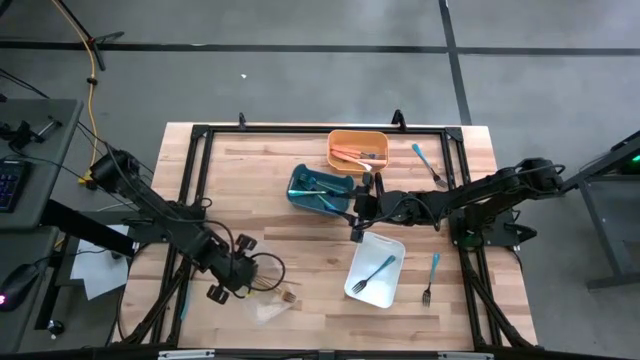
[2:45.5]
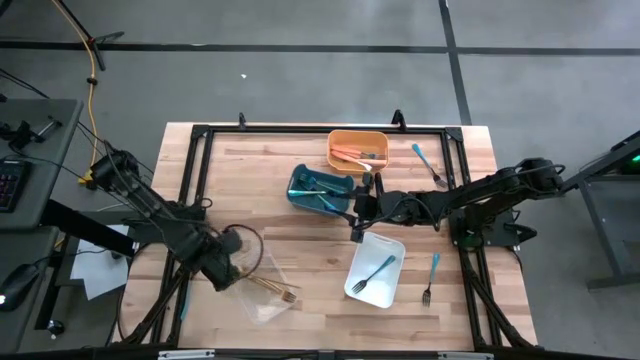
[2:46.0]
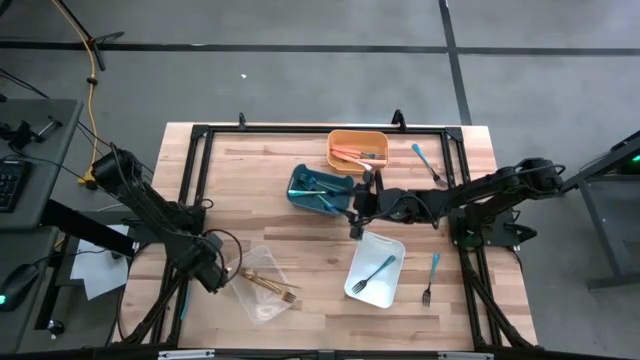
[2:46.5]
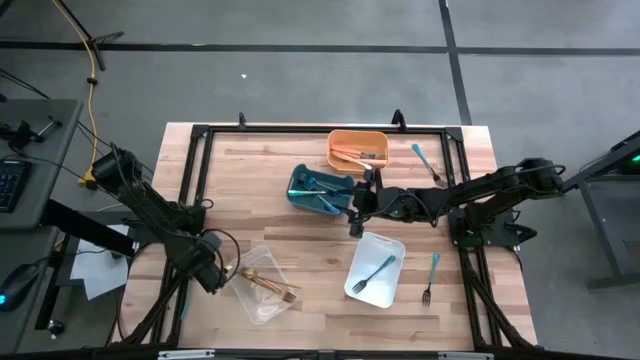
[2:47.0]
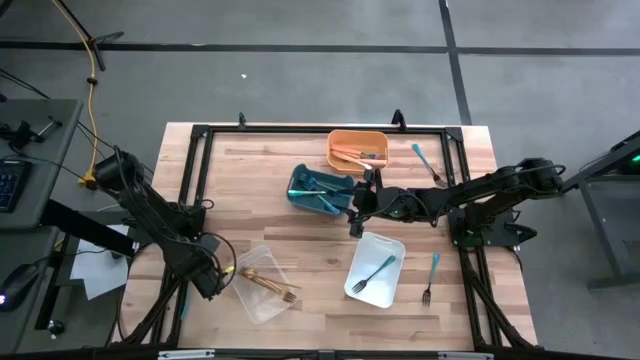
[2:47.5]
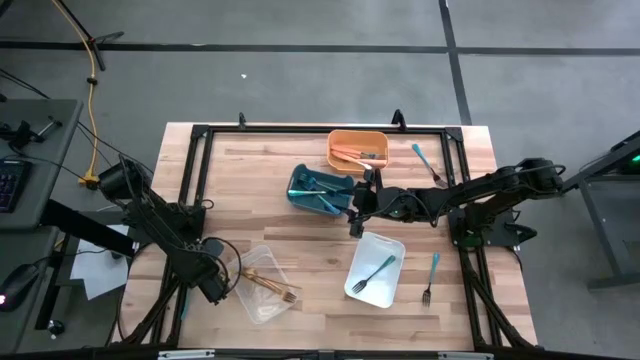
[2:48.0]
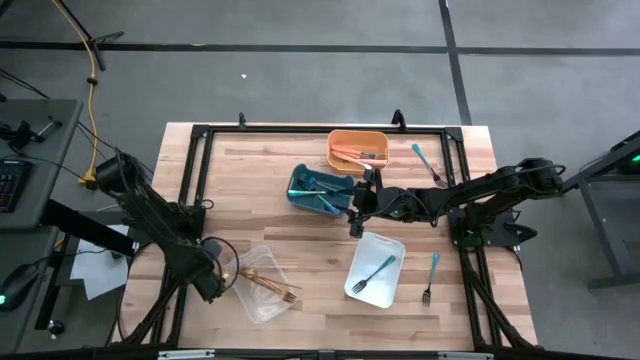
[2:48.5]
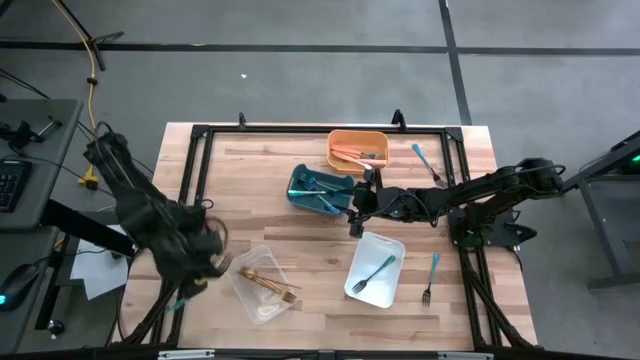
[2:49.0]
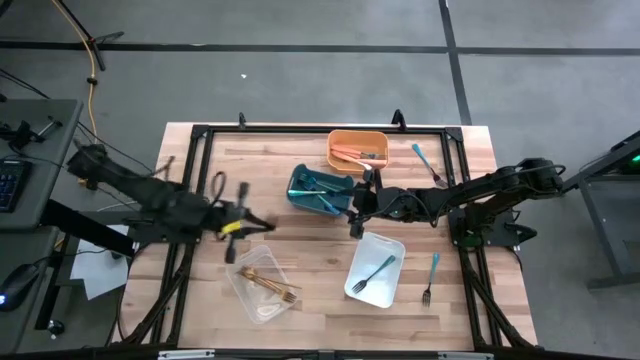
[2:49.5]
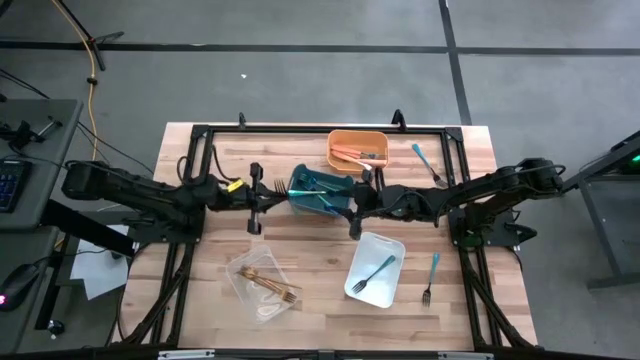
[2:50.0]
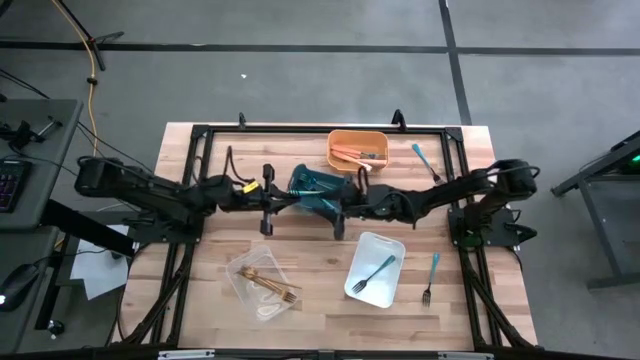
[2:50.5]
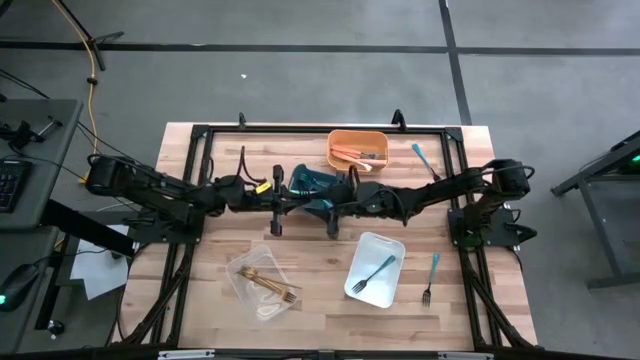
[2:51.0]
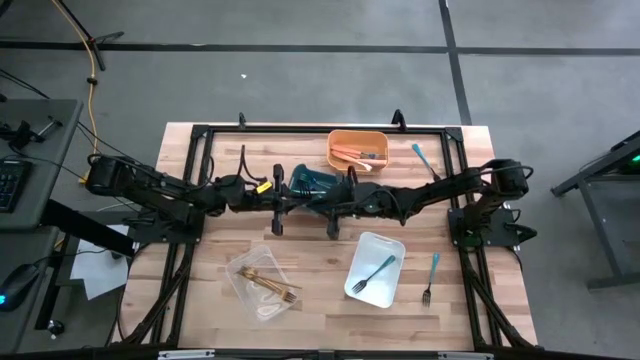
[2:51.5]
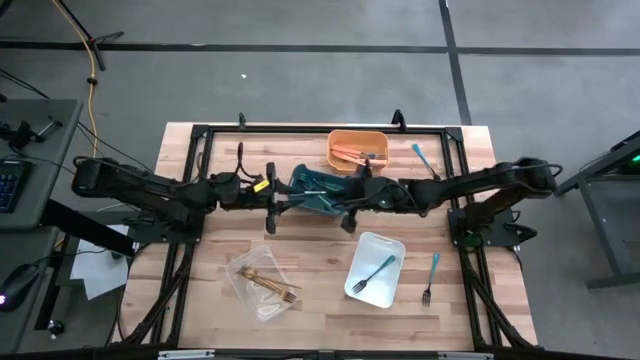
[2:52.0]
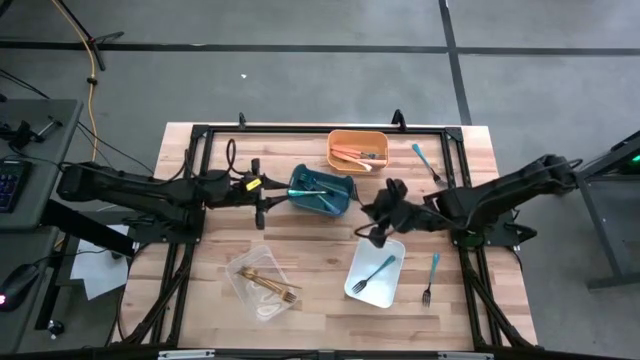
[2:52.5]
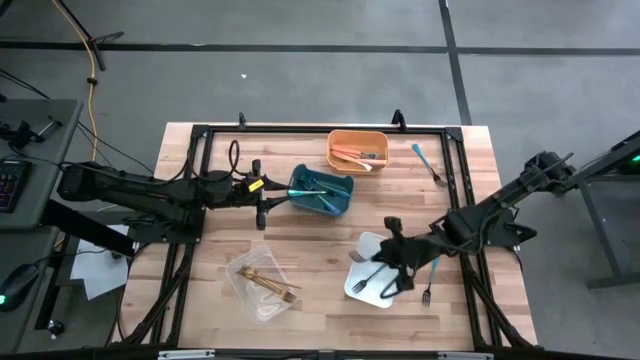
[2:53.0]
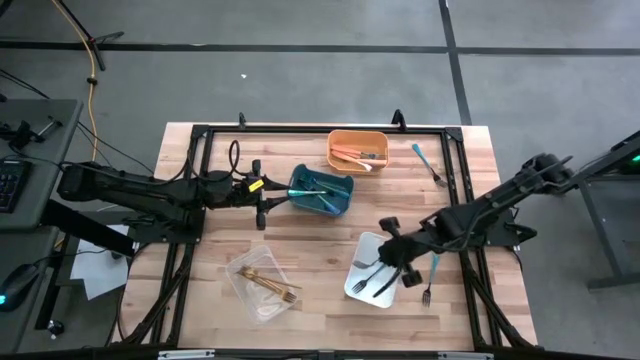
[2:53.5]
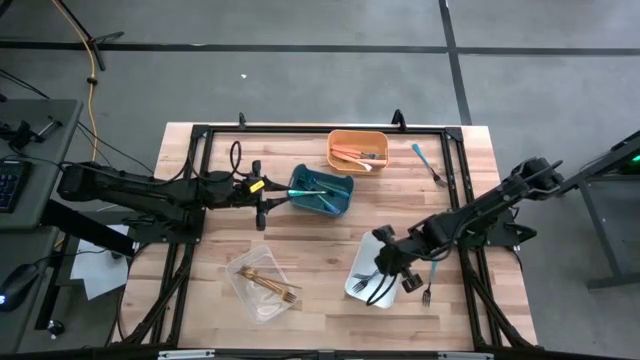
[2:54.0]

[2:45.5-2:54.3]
Task: Sort silverware by color (type)
Put the blue-black fork into the white bin

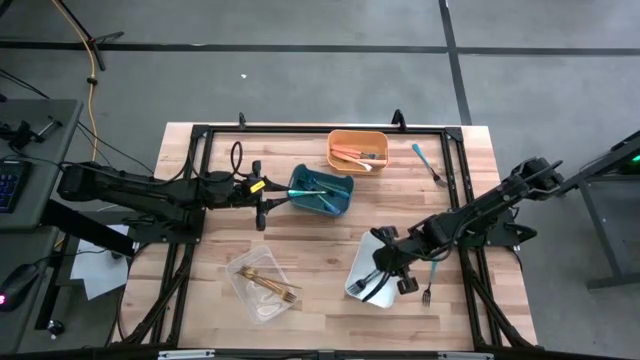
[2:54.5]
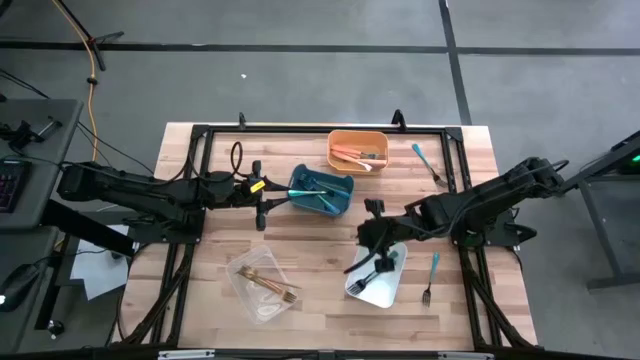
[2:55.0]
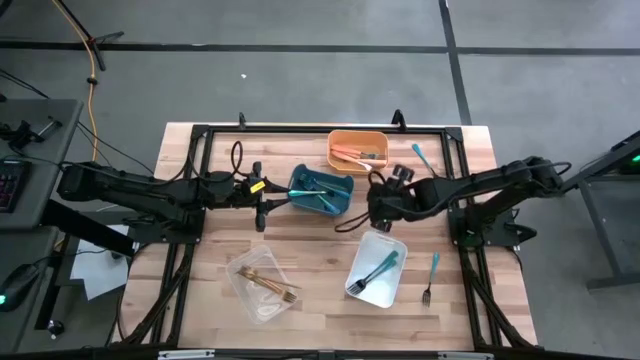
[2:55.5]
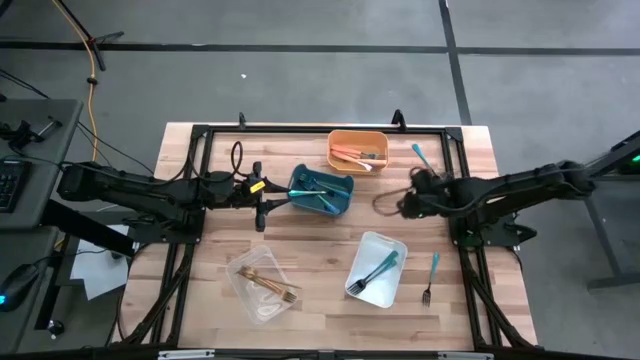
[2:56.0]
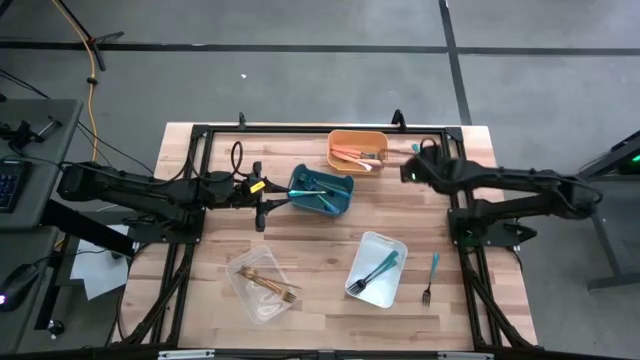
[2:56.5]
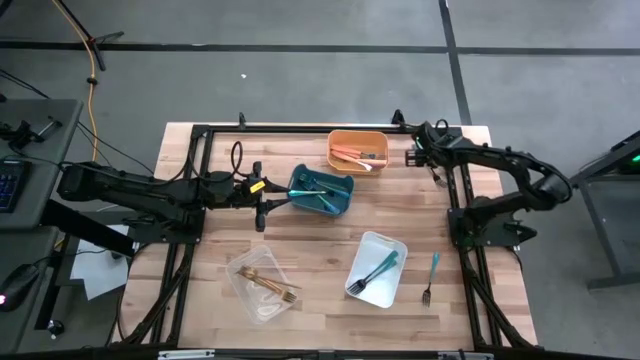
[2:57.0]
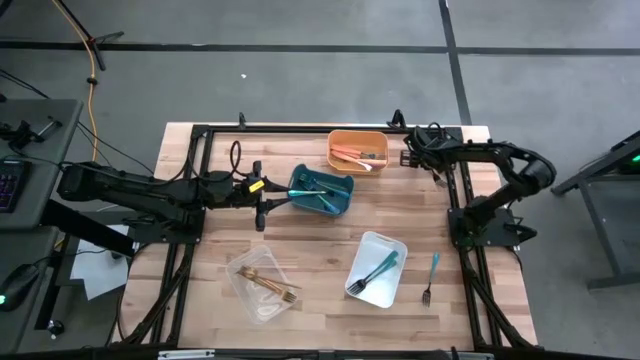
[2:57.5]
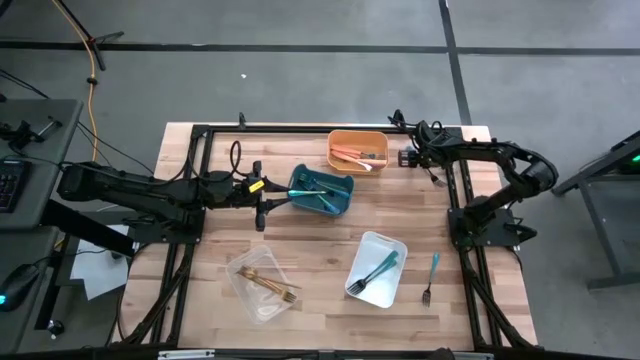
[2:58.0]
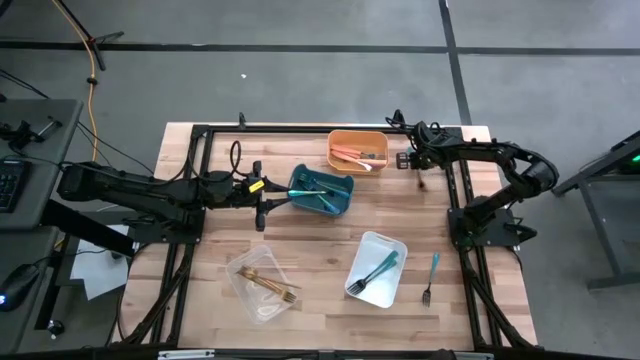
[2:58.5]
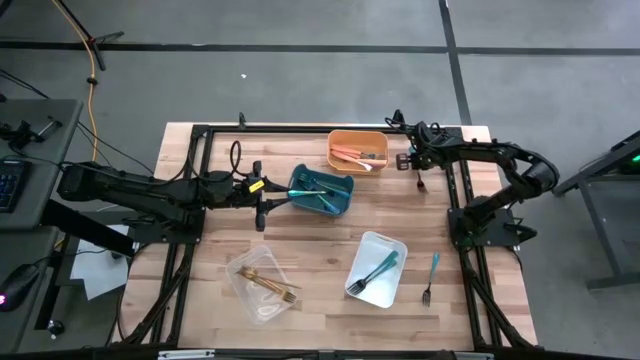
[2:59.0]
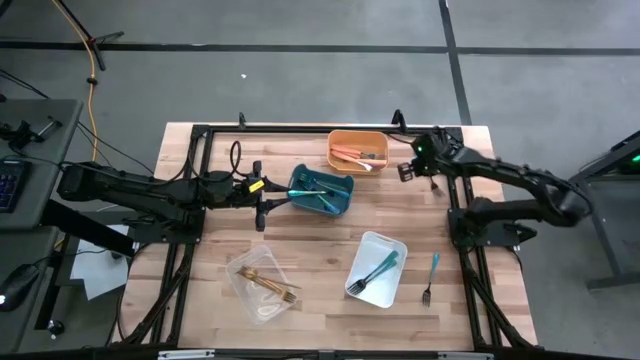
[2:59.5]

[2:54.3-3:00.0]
Put the blue-black fork into the white bin

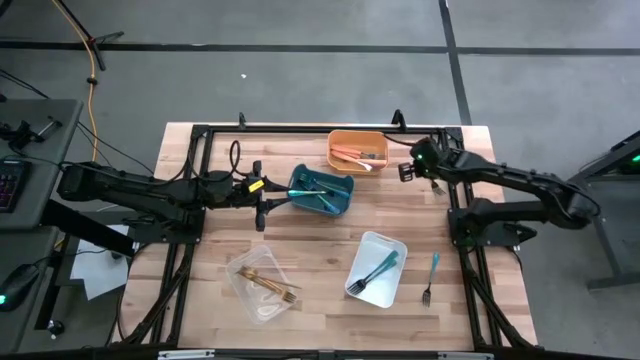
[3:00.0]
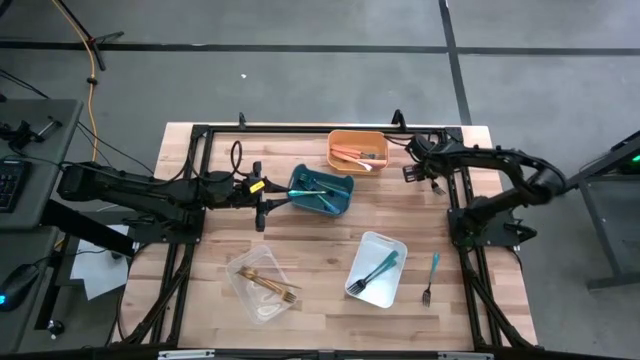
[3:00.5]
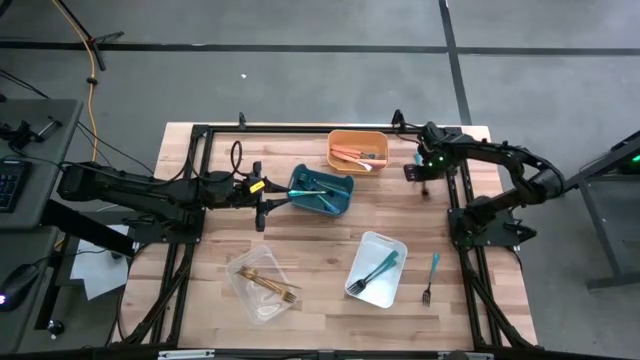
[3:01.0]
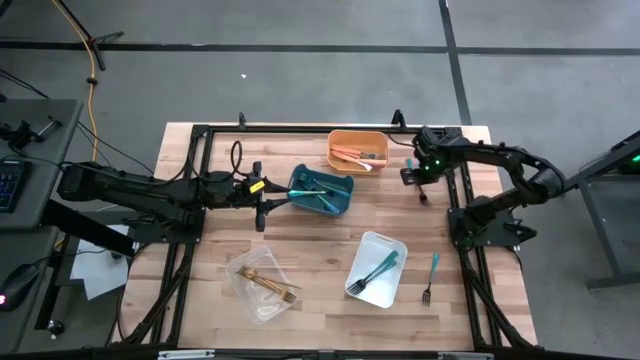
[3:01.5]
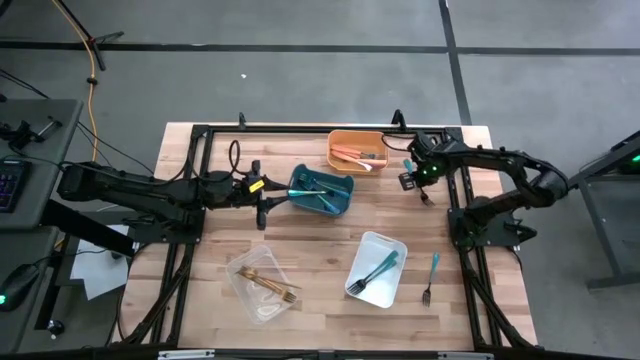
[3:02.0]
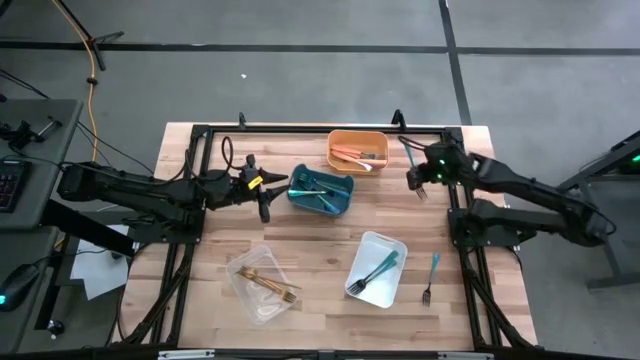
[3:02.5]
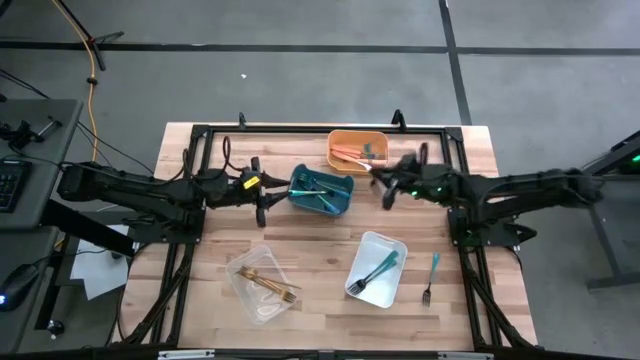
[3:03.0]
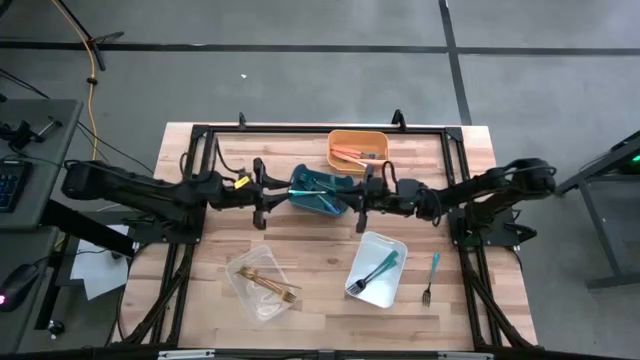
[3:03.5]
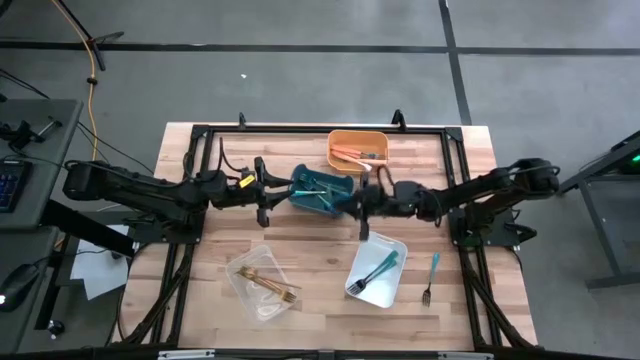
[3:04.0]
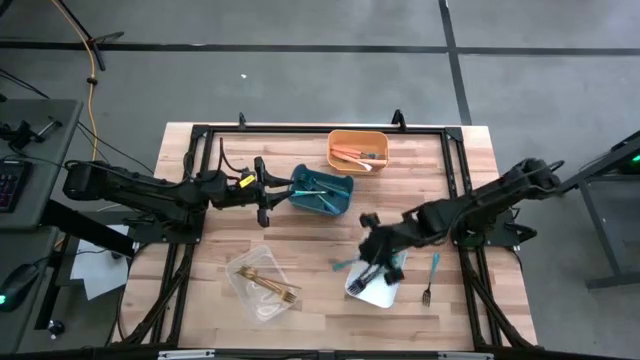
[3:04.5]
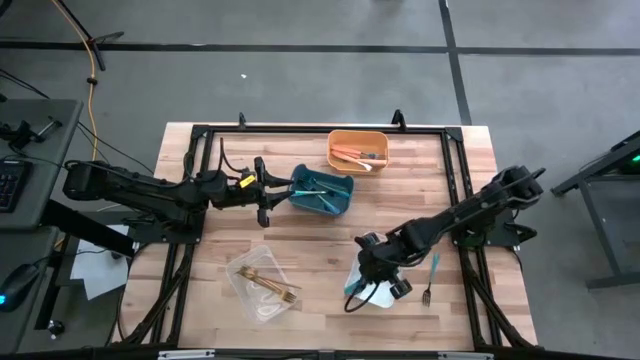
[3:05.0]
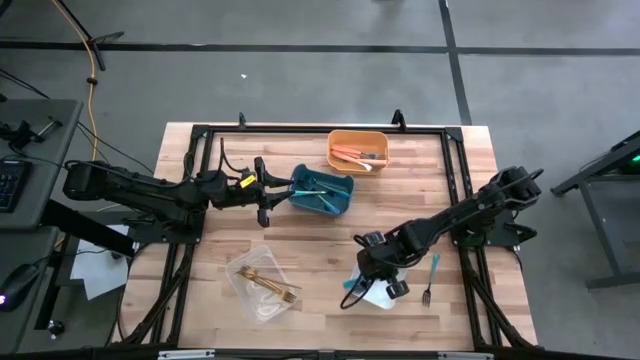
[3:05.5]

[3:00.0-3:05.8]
Put the blue-black fork into the white bin

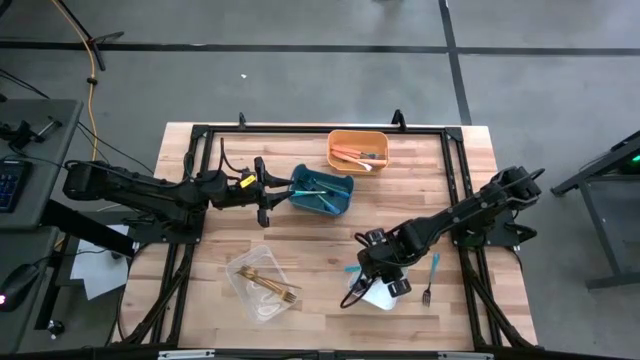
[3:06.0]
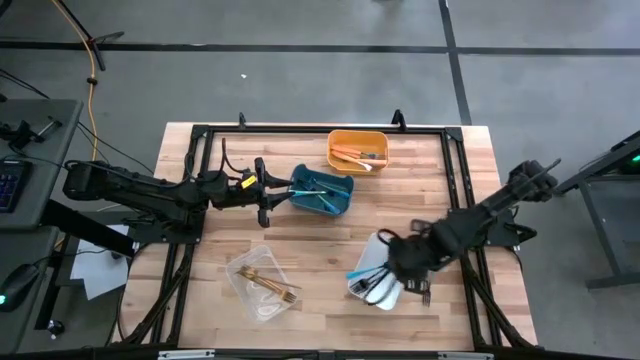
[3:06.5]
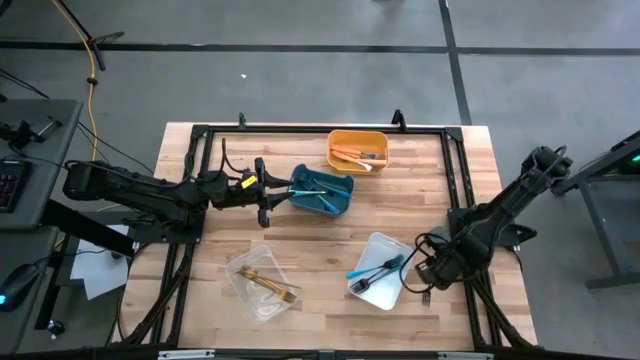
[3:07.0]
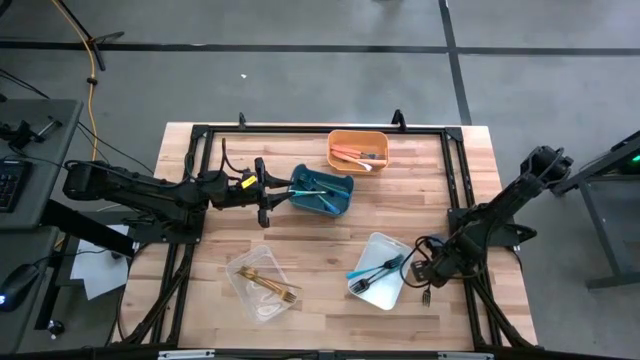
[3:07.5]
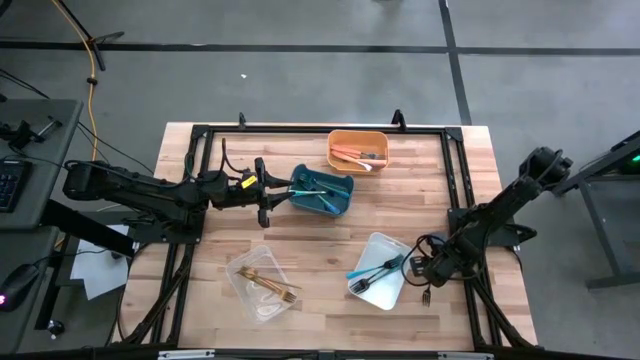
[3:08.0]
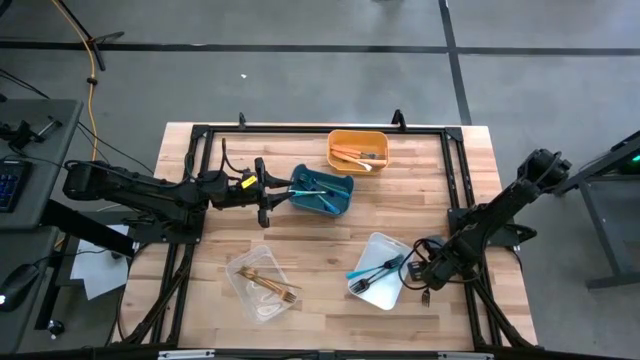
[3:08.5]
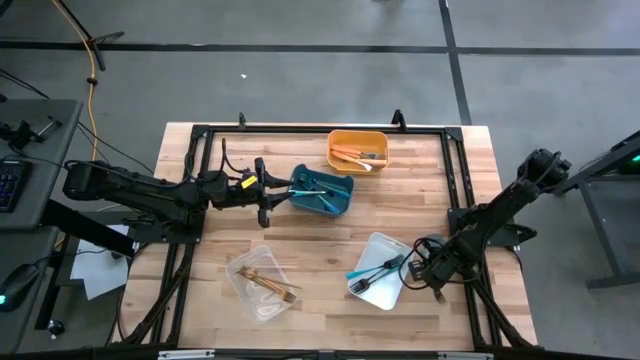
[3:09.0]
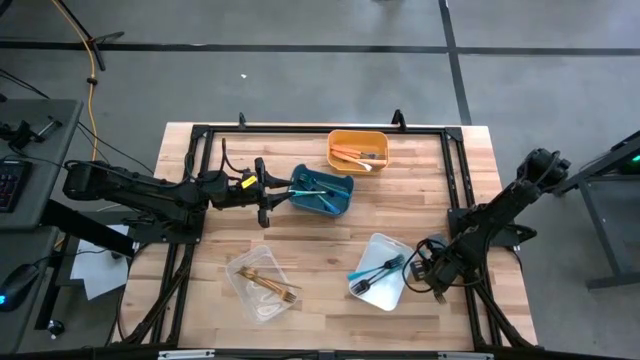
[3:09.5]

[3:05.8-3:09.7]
Put the blue-black fork into the white bin
